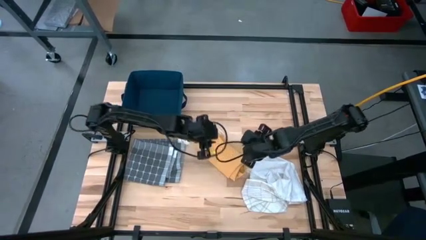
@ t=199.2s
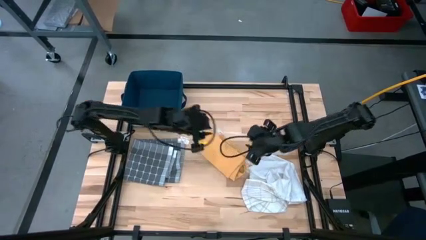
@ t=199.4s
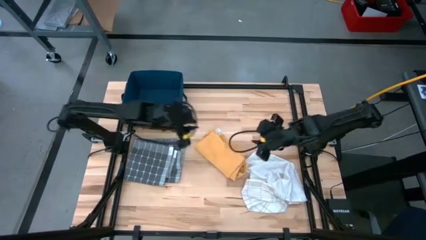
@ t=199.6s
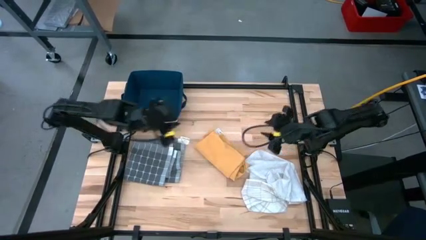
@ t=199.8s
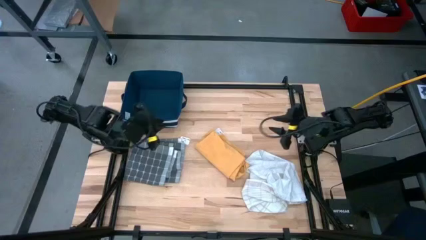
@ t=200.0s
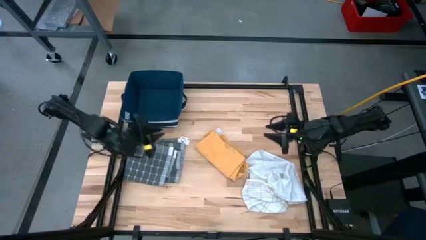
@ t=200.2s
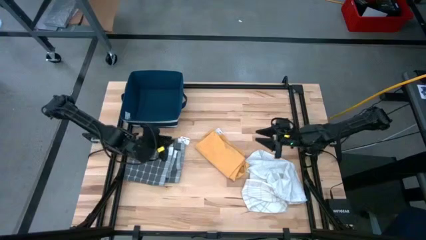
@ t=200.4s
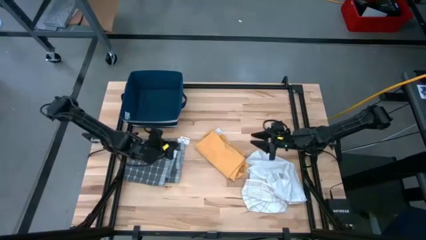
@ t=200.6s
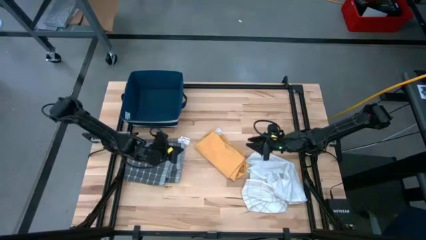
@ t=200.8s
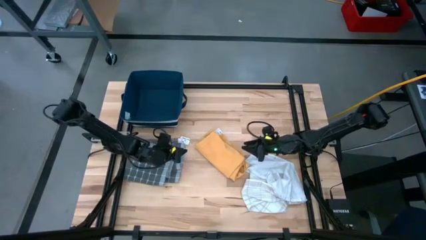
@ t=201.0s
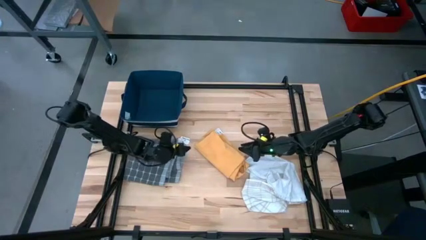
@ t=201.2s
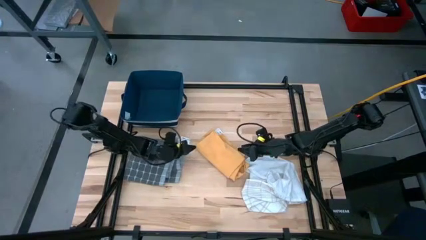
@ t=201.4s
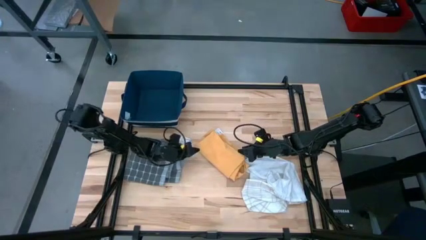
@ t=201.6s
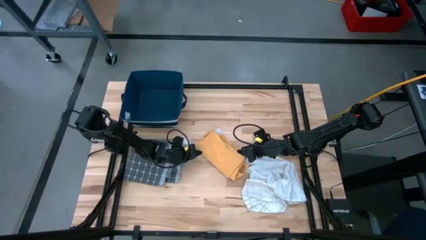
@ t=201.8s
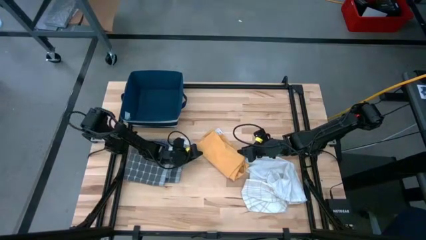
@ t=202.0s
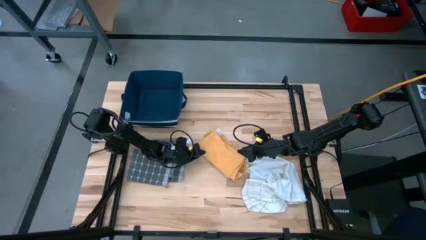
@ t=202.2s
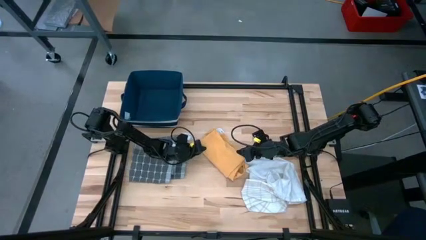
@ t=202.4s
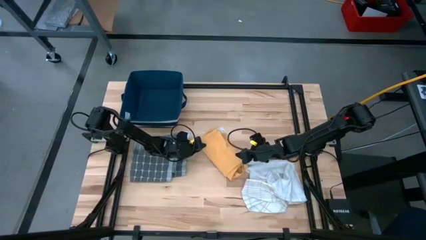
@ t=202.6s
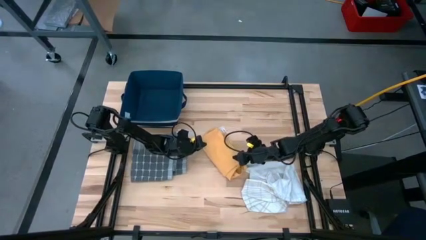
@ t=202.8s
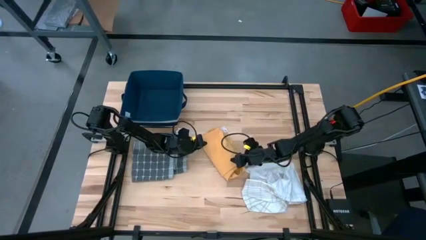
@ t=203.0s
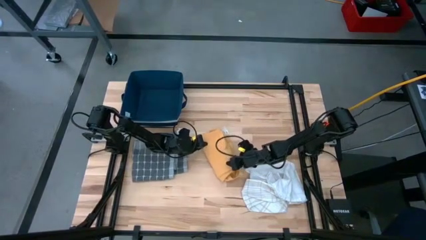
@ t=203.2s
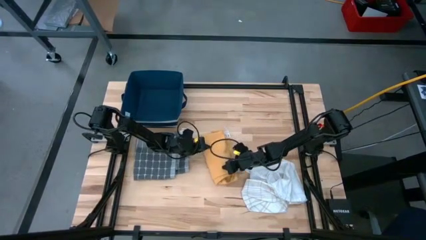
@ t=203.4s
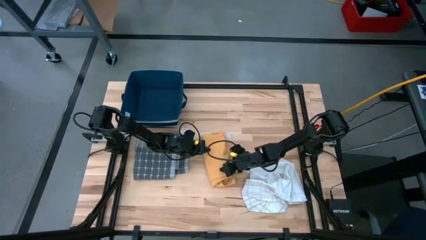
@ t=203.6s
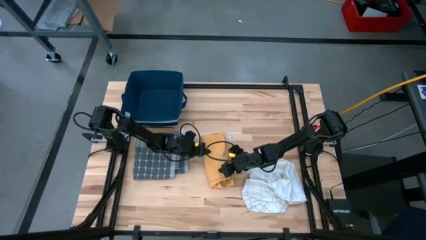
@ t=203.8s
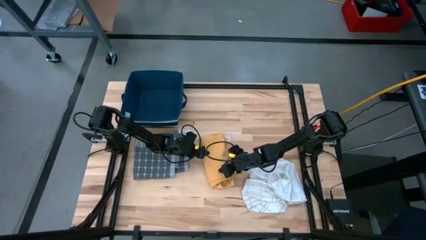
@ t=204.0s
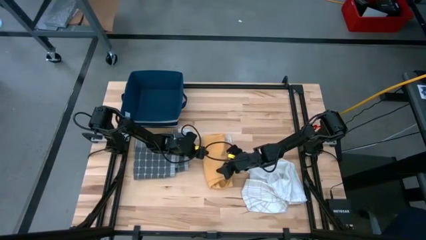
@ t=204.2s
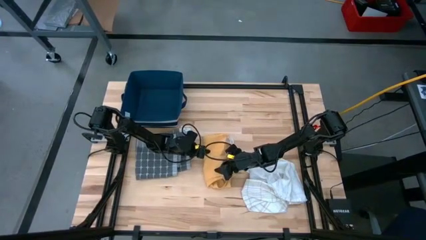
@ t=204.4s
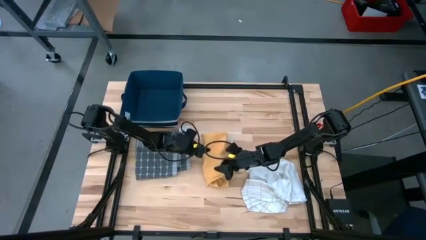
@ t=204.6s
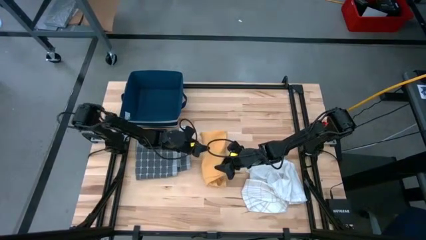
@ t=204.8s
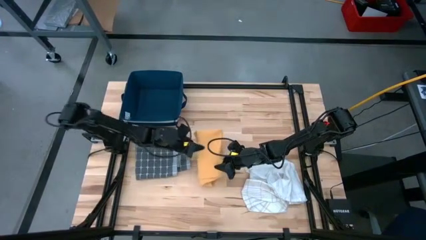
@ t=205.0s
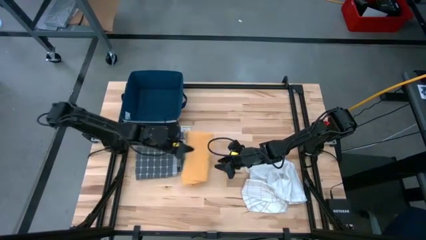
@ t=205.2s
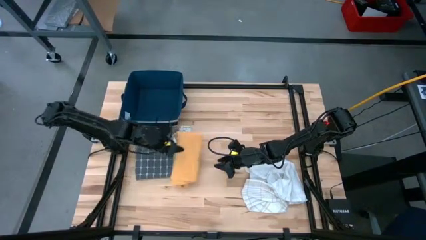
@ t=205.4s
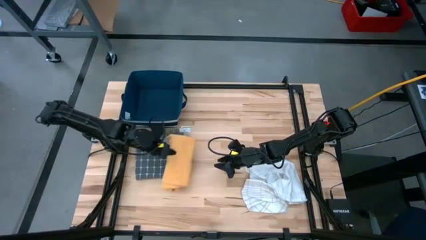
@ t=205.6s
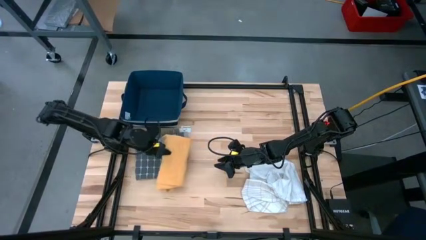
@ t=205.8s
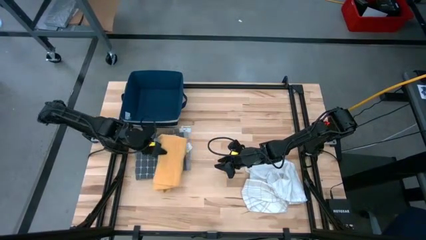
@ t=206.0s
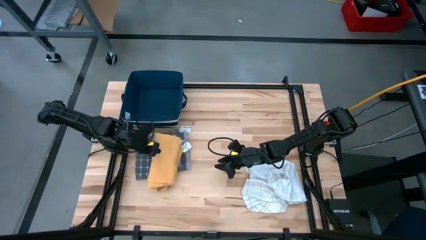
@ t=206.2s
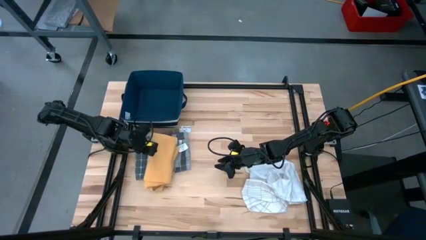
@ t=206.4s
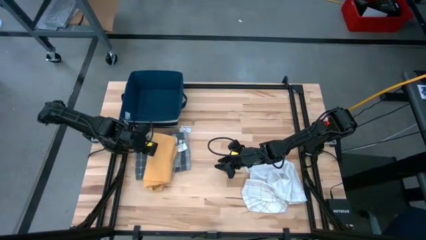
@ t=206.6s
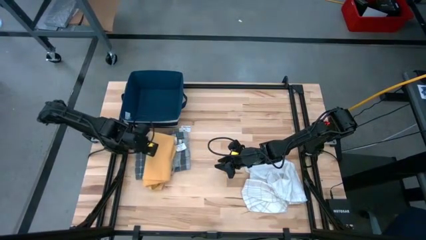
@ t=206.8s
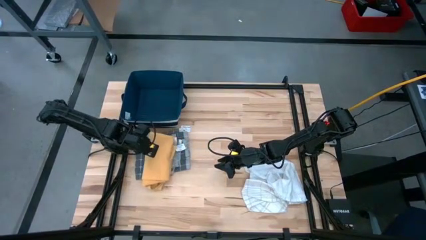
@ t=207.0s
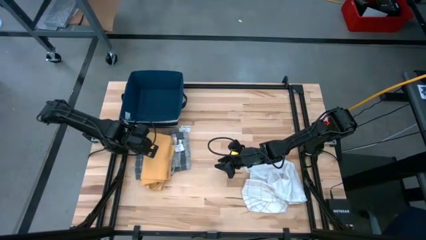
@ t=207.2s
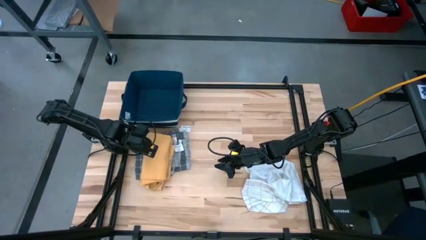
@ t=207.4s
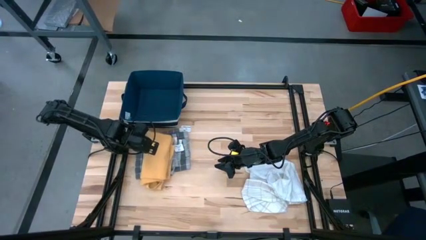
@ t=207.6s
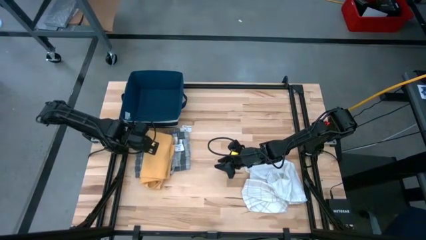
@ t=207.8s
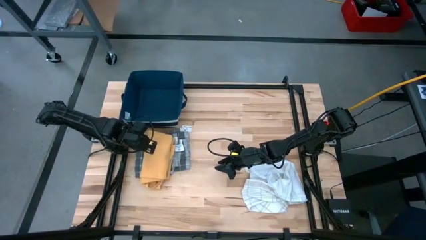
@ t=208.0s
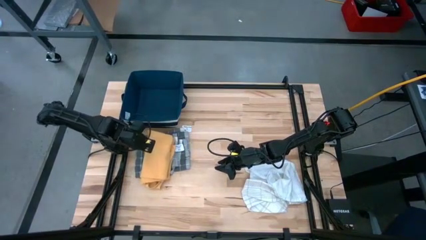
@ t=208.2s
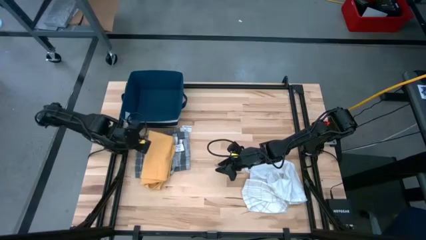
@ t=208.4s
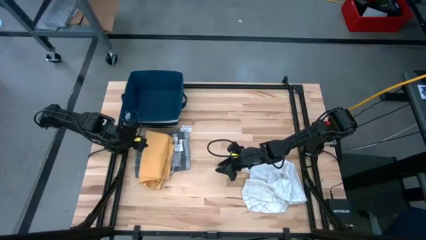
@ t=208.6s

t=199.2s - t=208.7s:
Task: Fold towel
Stack the folded yellow towel on top of the gray towel

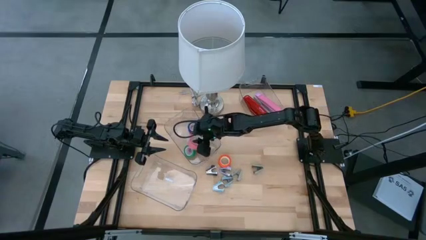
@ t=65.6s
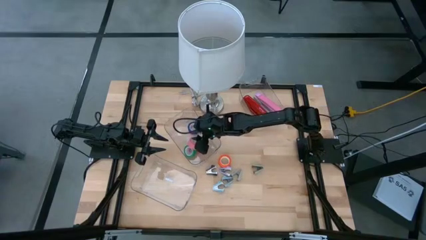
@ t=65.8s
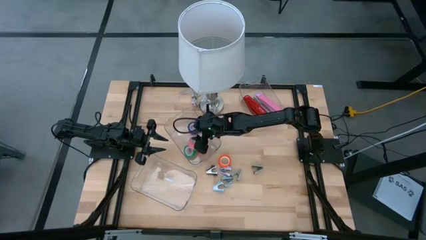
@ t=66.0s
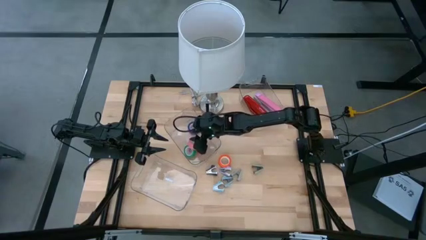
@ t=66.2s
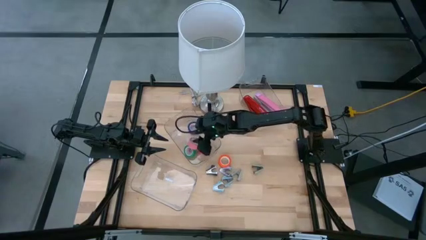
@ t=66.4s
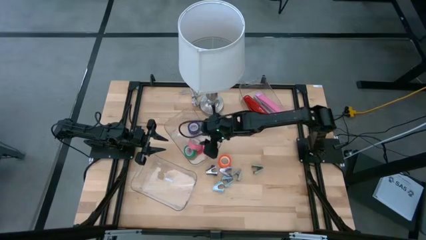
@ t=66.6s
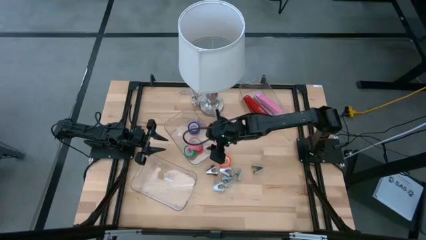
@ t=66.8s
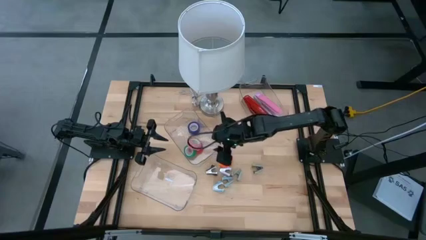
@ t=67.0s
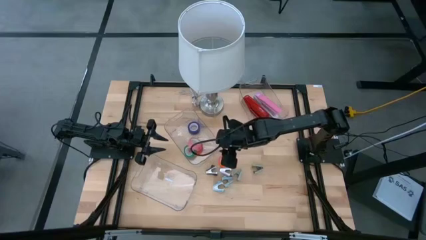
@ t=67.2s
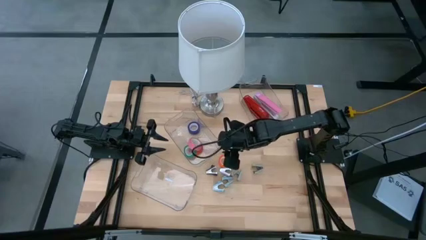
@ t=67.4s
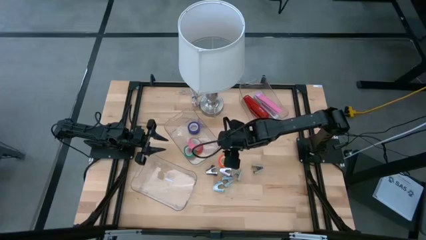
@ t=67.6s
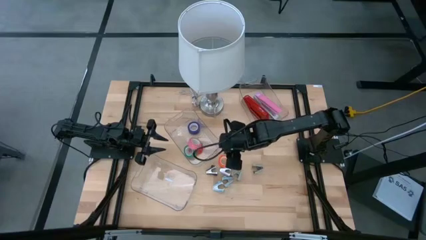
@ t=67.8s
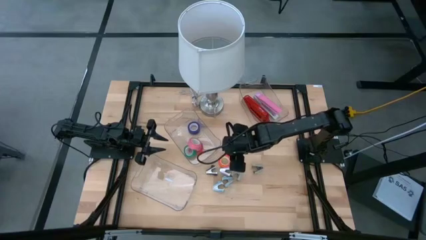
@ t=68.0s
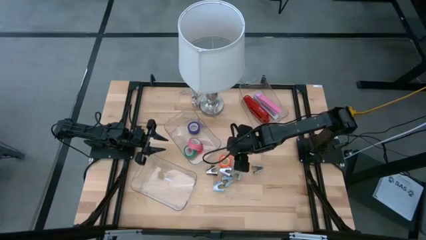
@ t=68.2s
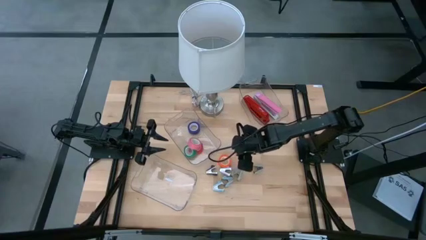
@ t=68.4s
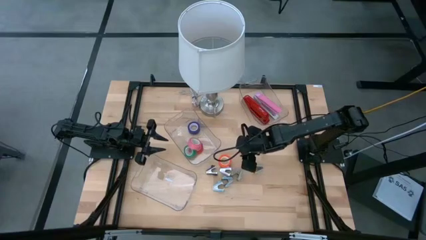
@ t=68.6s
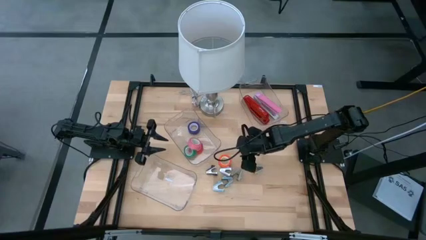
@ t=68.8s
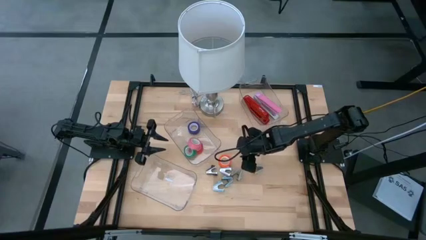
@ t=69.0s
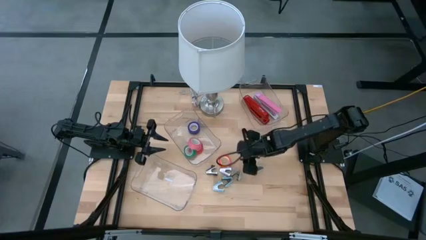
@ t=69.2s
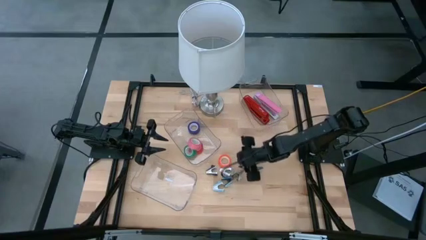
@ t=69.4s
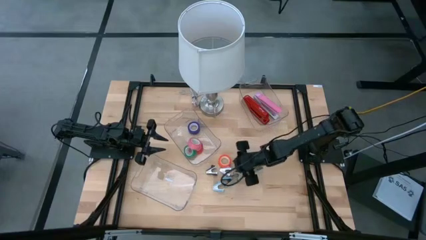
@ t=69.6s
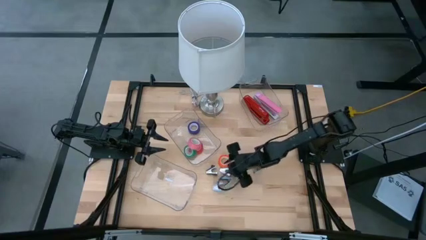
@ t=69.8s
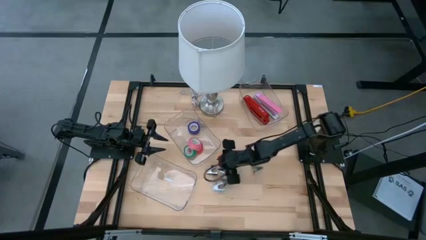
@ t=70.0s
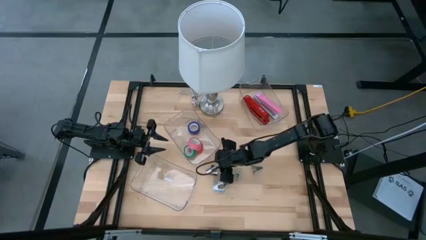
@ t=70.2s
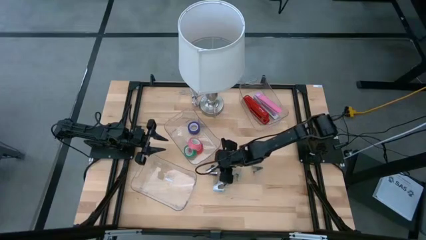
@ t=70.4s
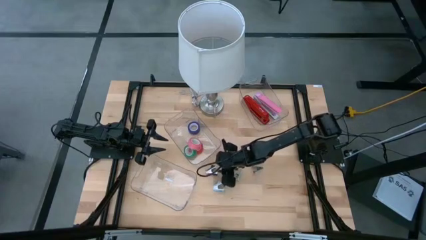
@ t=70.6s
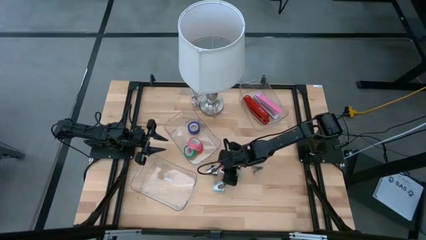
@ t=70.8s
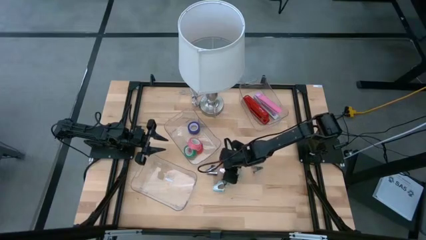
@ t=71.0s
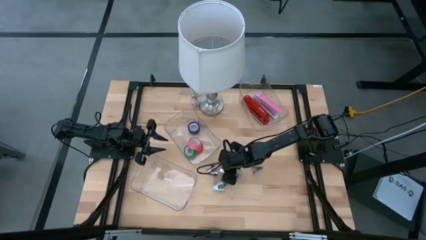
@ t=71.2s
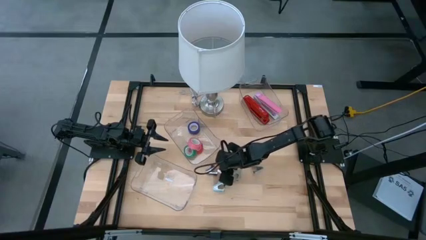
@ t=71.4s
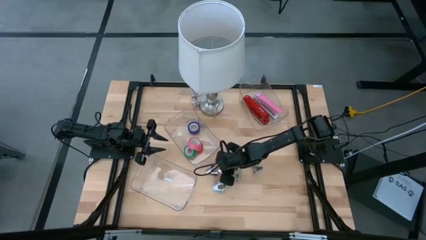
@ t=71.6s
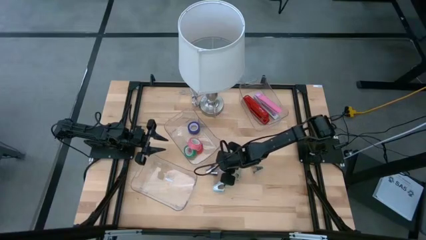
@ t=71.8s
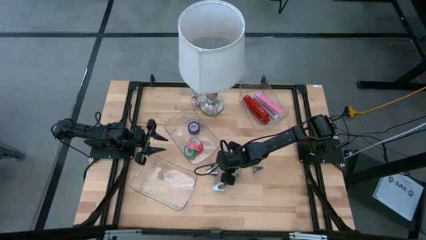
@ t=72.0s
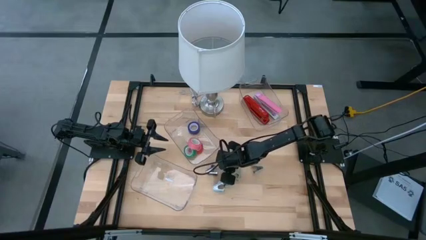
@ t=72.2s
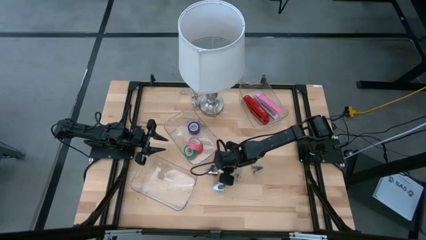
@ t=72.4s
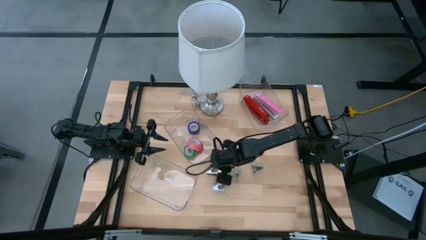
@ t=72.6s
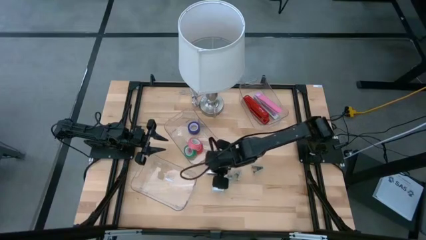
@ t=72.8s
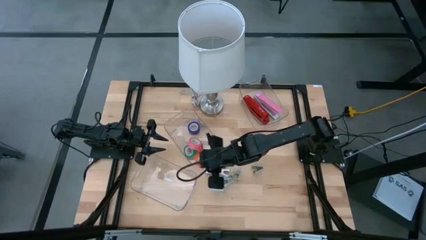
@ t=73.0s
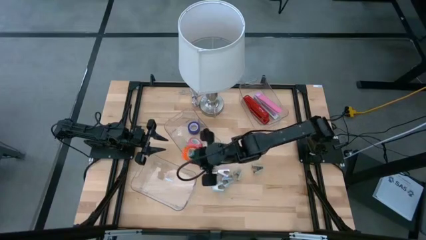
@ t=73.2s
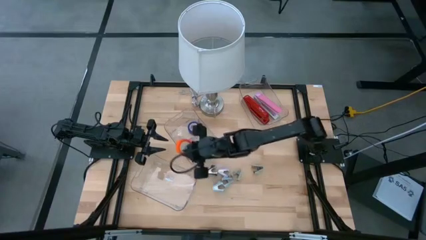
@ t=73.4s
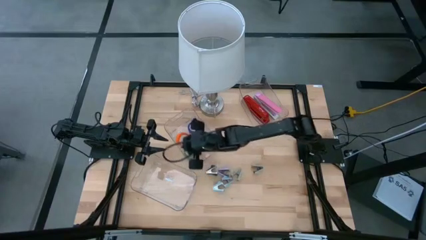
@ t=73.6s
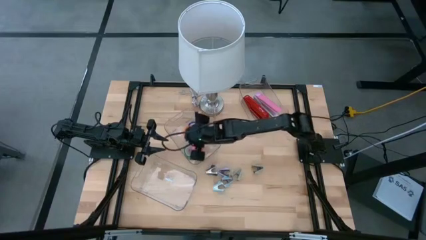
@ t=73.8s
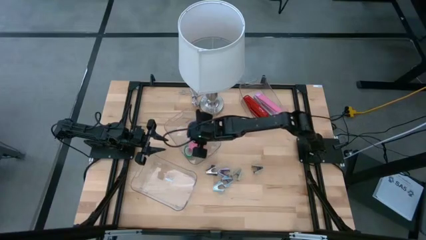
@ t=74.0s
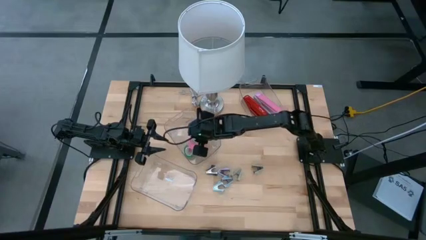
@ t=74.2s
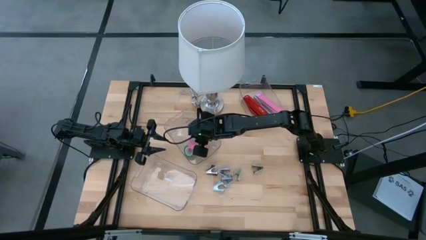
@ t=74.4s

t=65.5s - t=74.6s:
Task: Pick and place Stapler, Stapler remover, tape
Put the orange tape into the middle transparent bin
